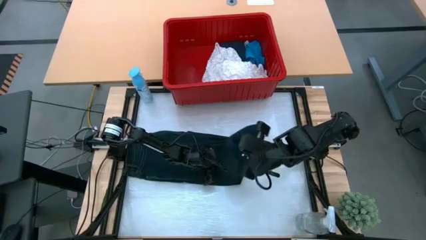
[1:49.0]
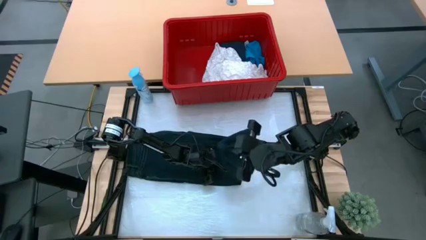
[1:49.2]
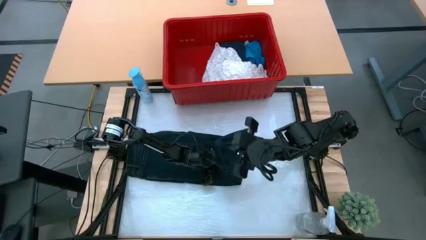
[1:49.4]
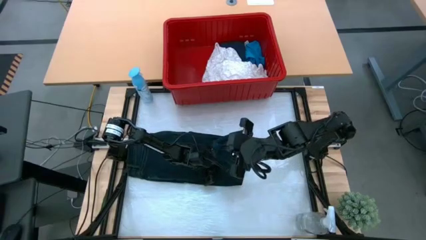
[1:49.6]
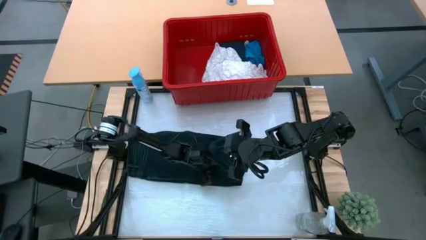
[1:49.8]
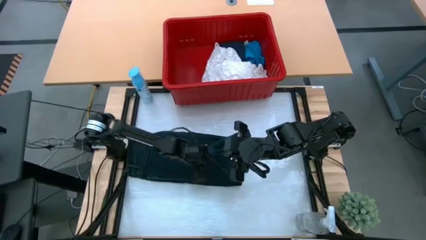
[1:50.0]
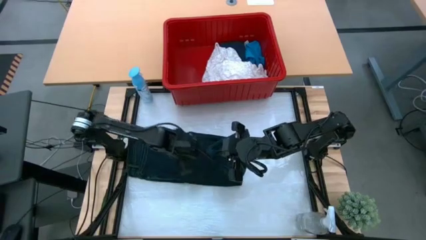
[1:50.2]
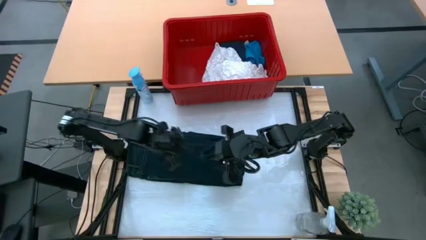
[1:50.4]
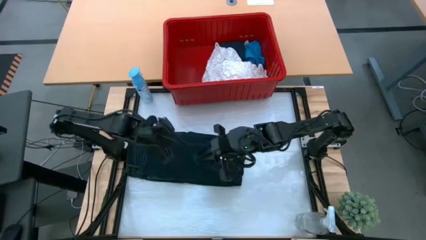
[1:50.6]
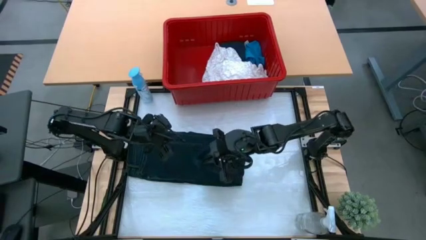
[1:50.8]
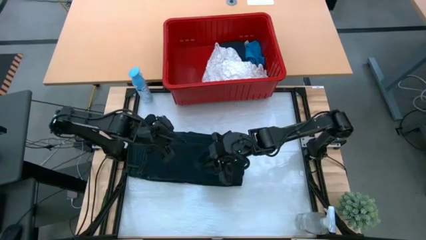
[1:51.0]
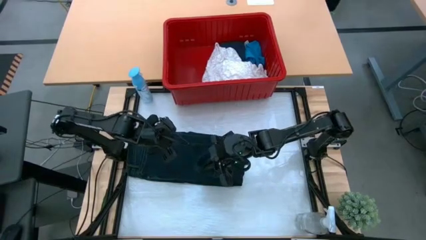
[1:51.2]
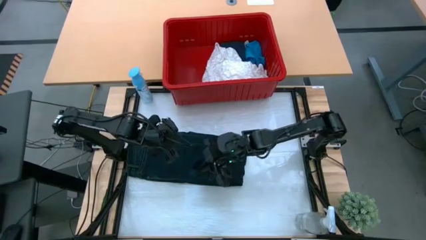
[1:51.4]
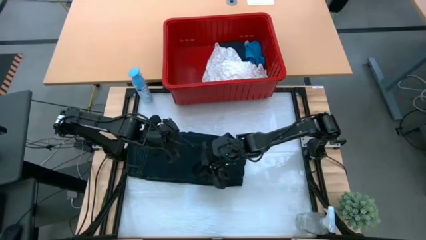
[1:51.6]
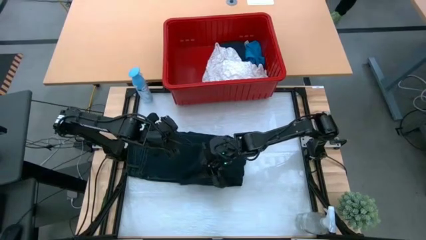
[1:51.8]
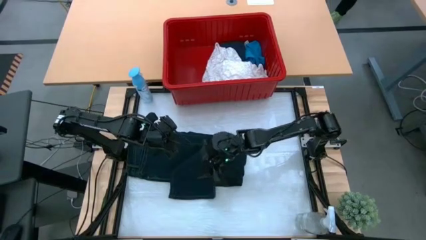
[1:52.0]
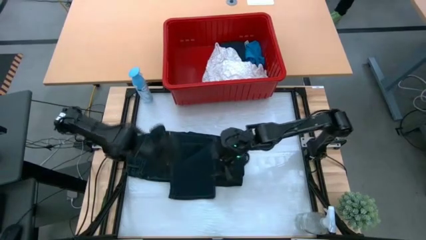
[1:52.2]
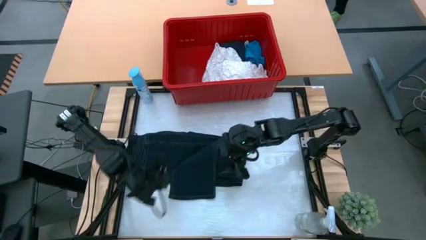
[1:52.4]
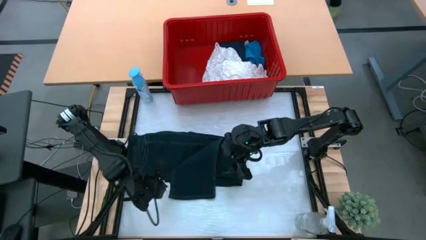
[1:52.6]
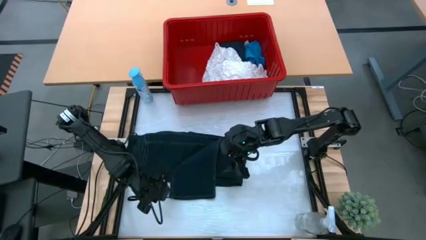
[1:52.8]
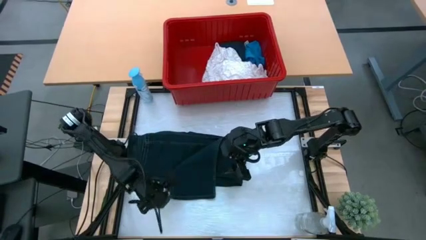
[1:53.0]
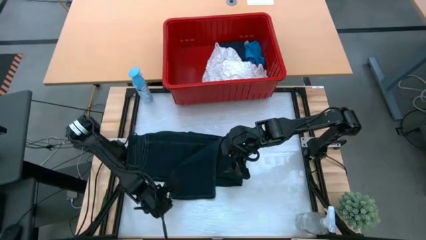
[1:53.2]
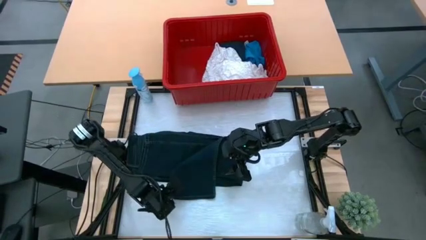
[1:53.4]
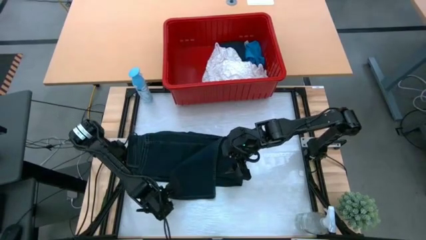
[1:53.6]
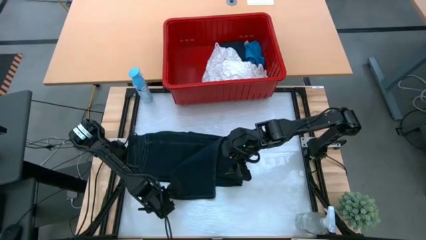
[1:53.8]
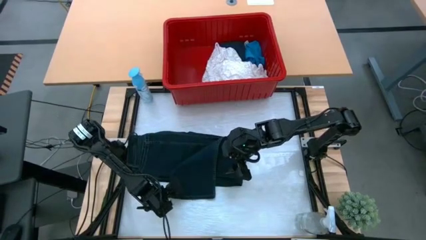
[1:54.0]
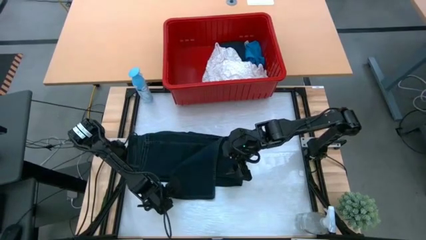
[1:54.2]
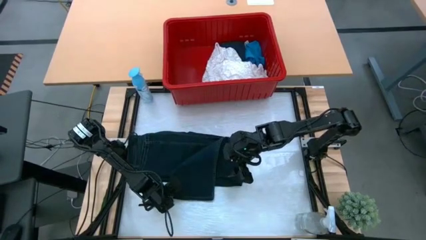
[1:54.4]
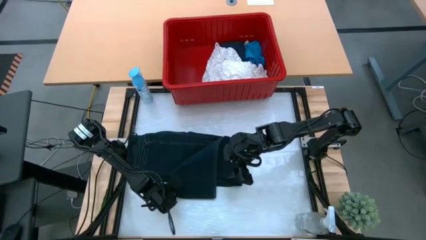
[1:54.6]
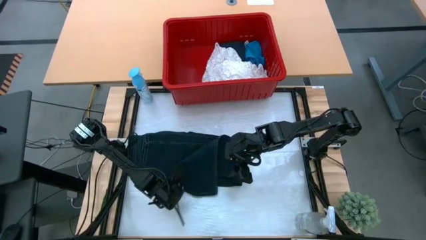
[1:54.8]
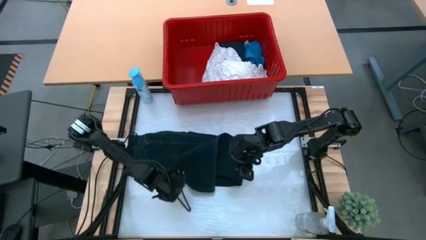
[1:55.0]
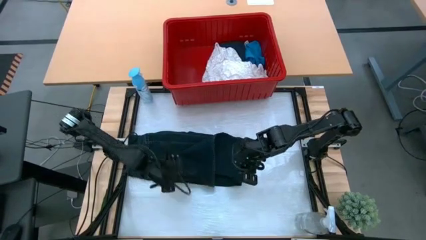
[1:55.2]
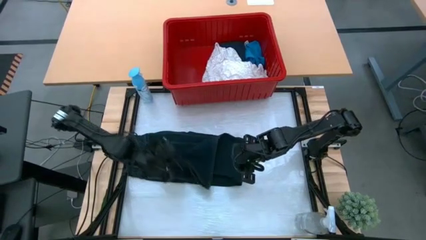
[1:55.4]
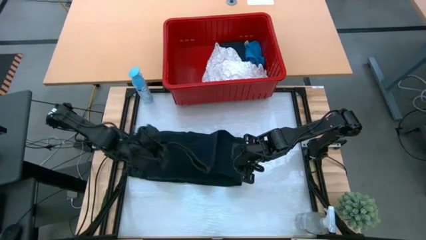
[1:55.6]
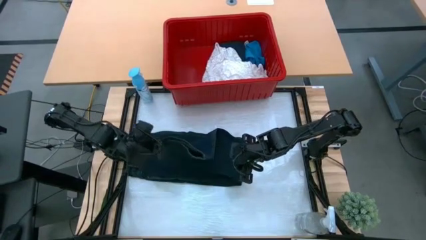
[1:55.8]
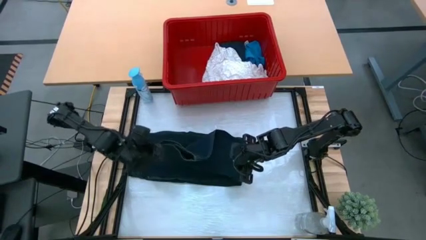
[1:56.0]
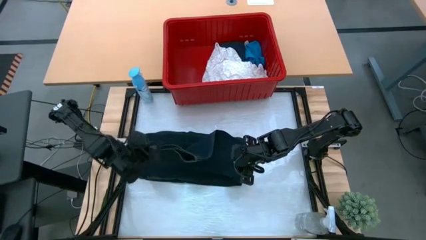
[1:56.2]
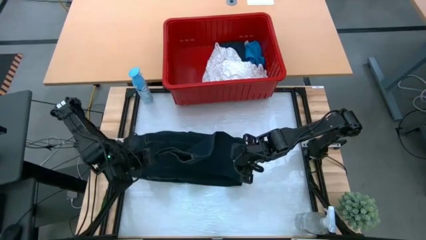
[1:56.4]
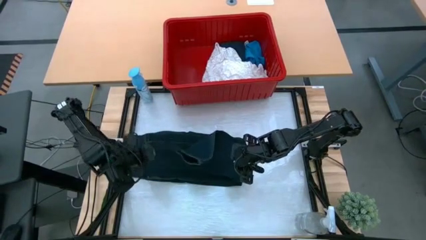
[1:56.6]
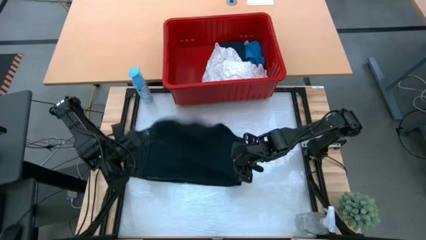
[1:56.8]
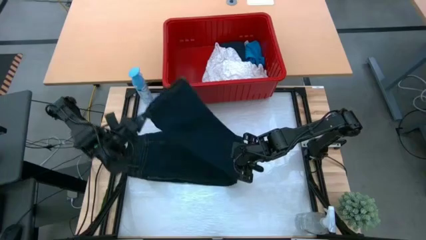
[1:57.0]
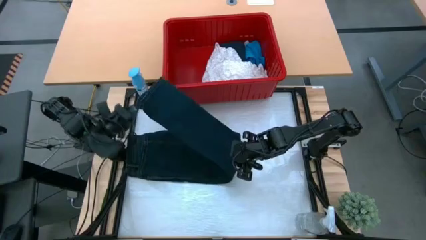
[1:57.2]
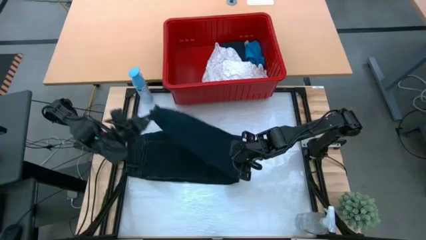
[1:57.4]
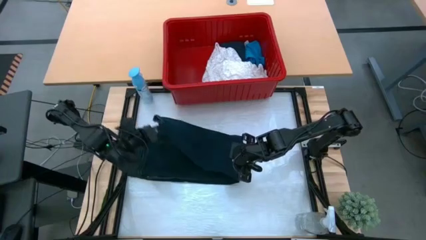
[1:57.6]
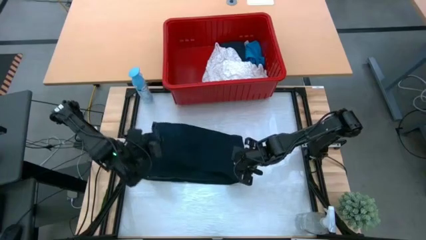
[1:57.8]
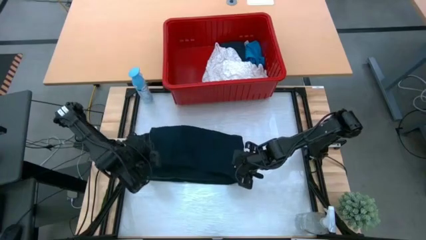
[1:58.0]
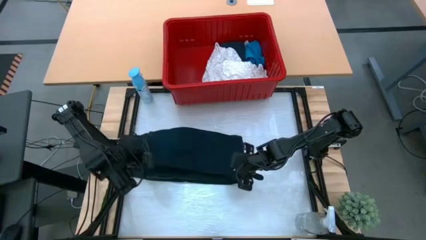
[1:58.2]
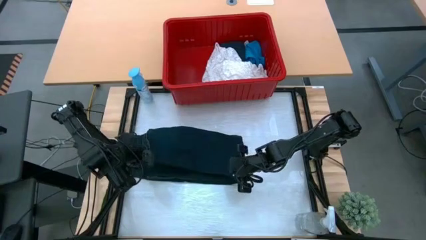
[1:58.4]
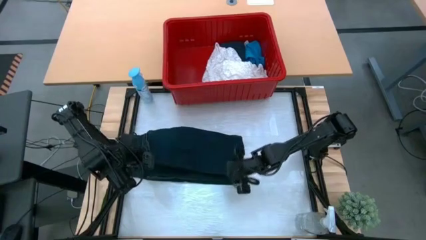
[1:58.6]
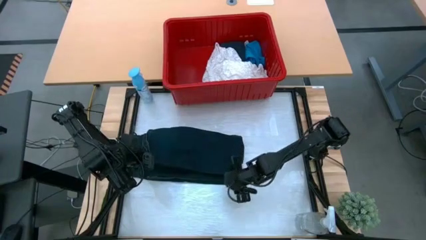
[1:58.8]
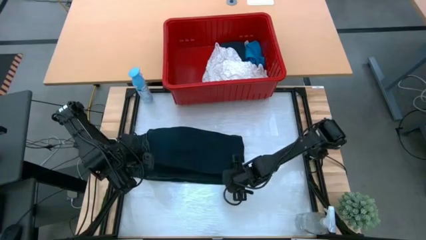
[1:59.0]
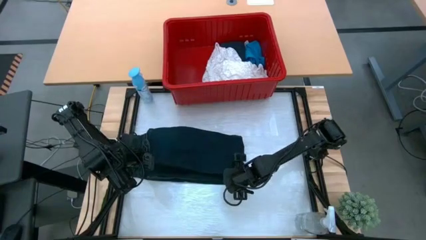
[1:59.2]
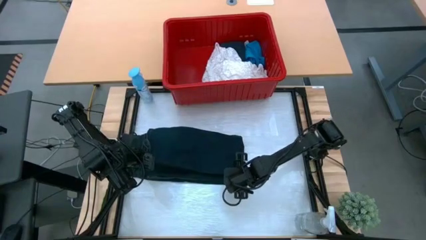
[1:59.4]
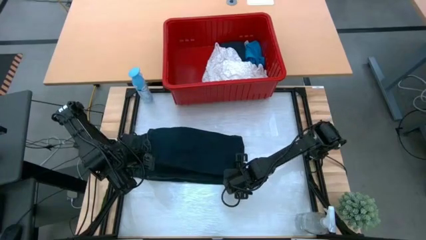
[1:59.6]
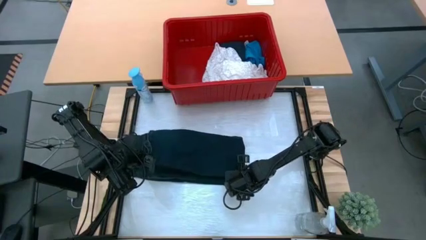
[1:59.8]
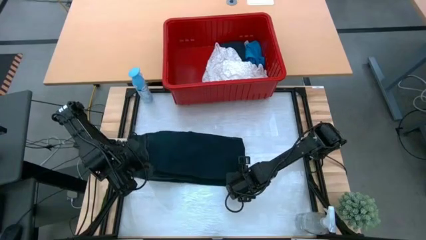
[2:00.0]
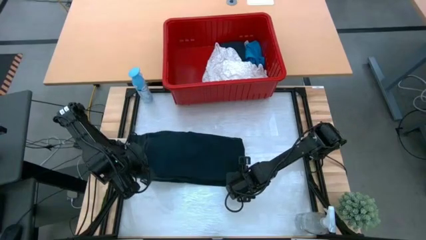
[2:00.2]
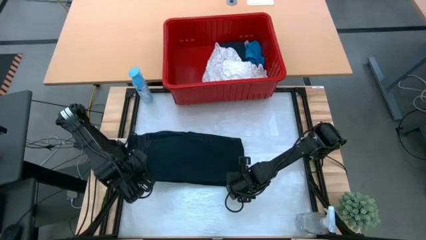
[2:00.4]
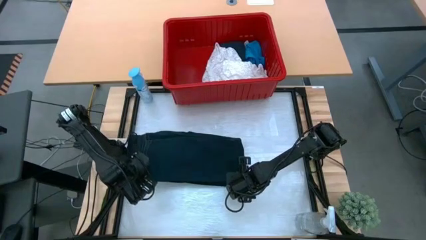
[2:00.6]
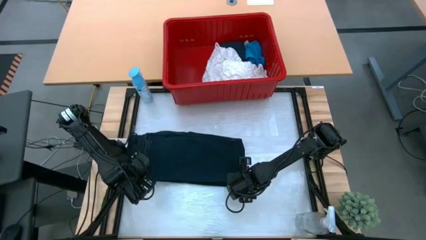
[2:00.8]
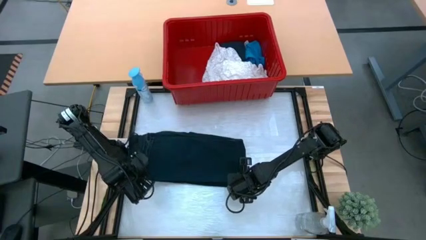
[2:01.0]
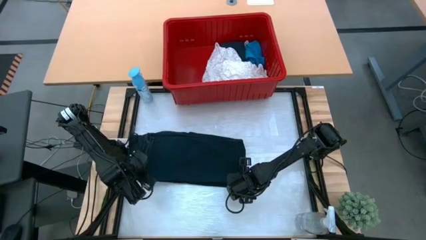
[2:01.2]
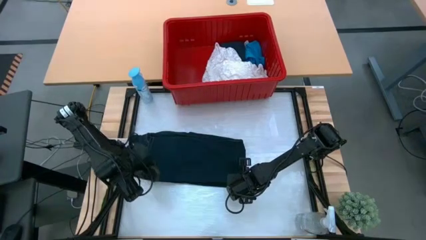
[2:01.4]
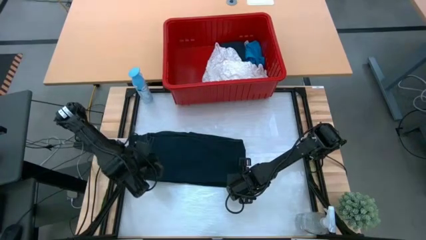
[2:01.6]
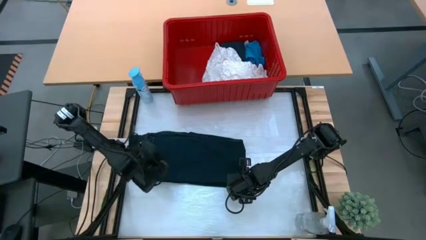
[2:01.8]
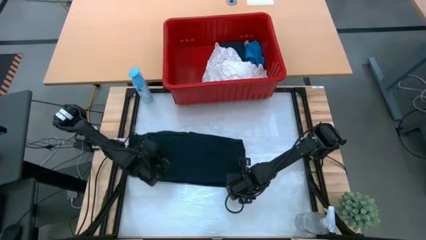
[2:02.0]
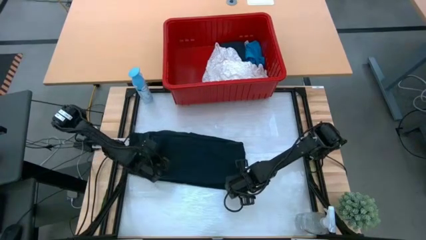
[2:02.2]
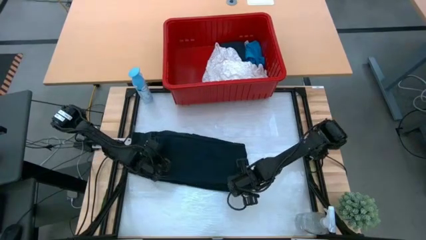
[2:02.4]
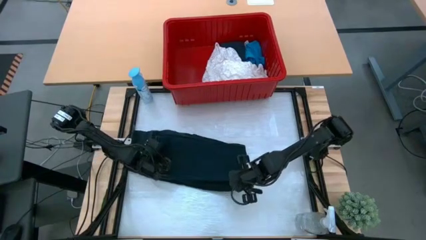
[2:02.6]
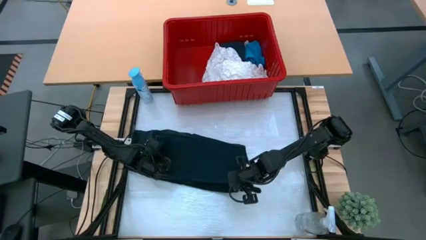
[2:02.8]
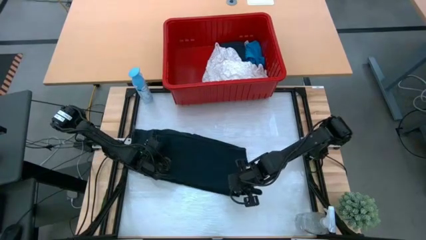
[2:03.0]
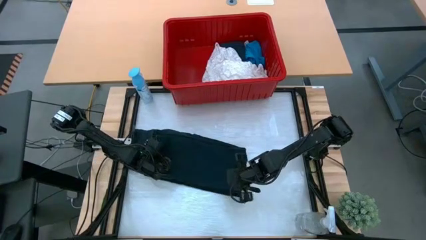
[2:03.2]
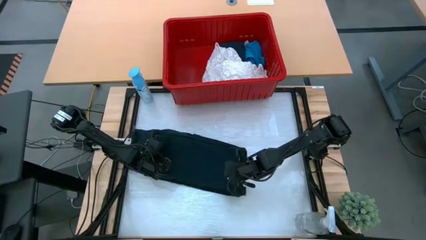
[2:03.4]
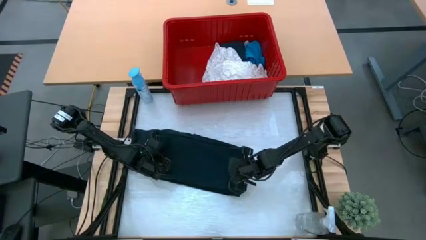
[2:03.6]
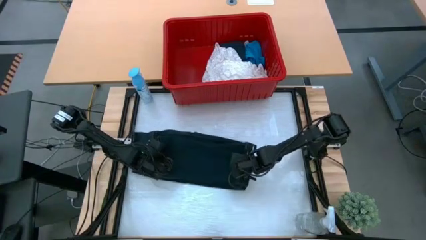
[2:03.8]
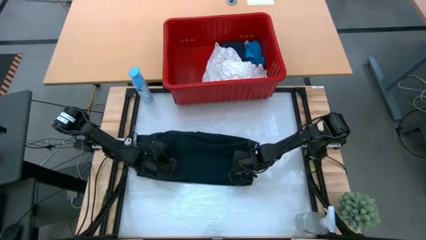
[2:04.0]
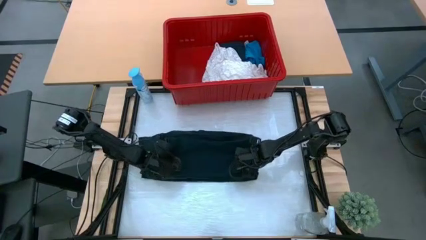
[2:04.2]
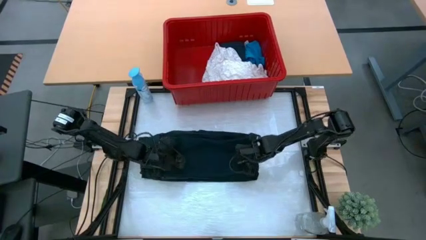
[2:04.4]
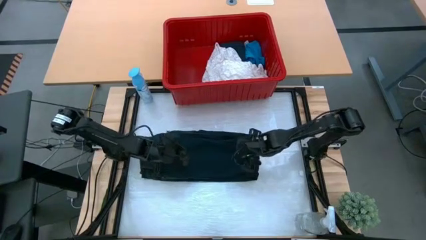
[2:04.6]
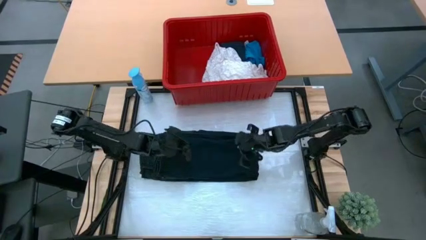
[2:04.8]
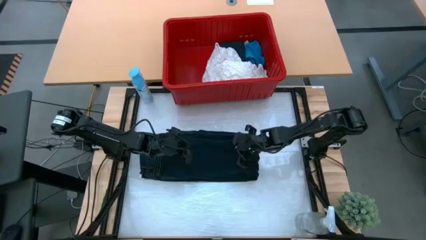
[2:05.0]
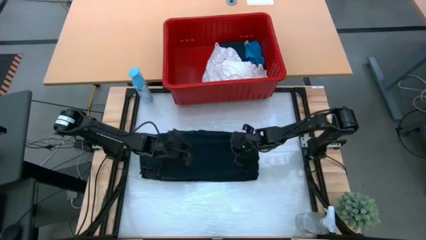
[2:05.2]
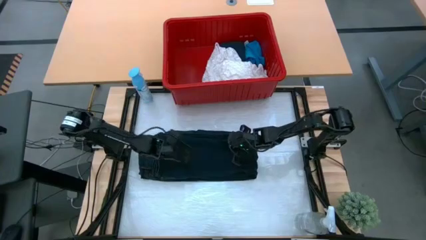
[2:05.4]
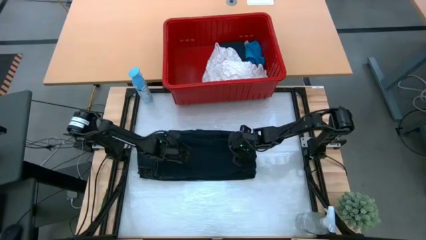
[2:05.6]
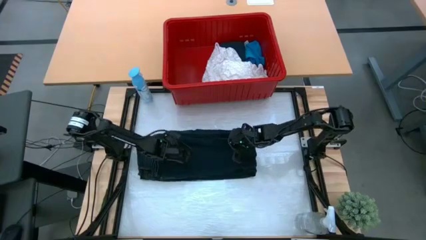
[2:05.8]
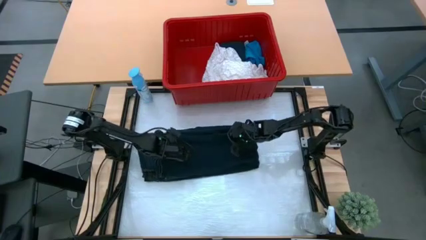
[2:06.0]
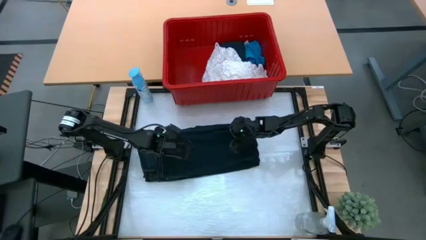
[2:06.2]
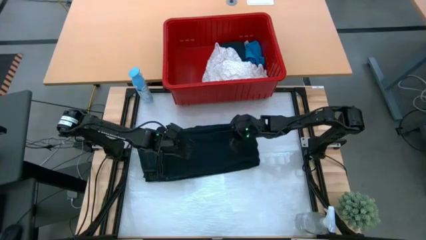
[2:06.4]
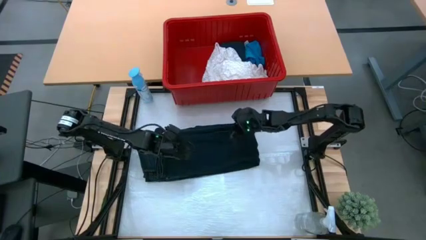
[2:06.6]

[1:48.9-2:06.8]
Task: Fold Laundry from Bin
Fold the black pants from the red bin
